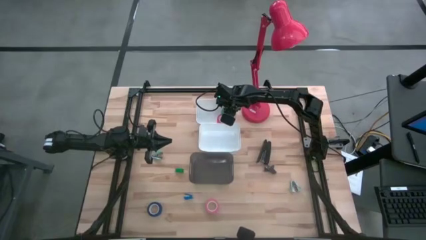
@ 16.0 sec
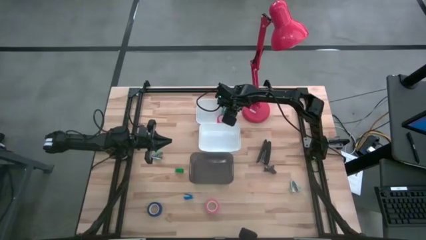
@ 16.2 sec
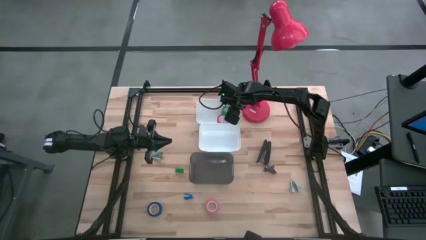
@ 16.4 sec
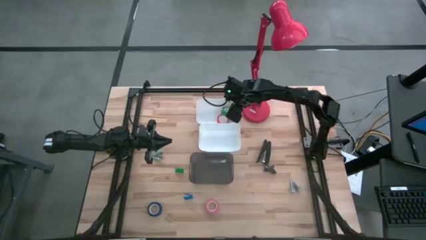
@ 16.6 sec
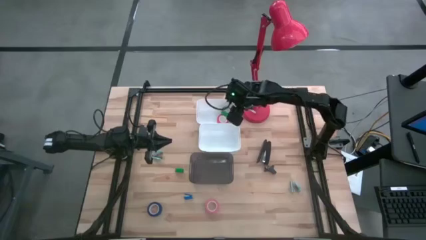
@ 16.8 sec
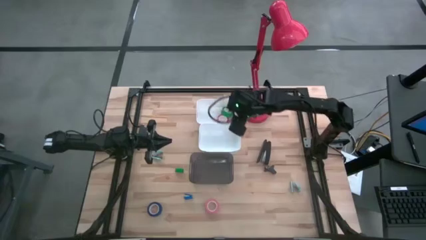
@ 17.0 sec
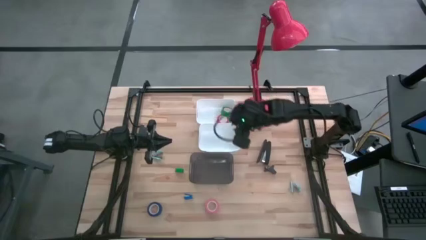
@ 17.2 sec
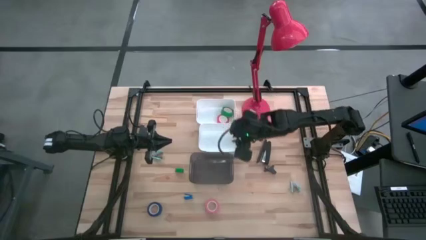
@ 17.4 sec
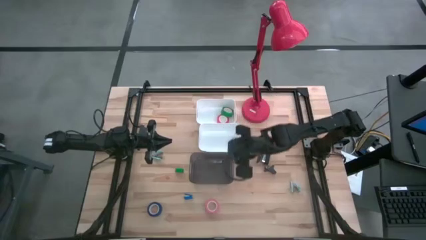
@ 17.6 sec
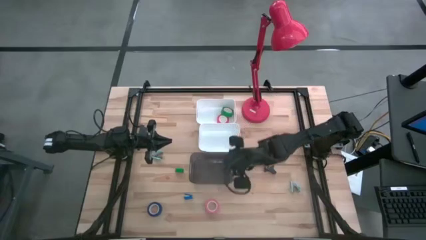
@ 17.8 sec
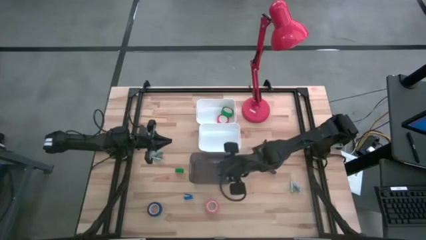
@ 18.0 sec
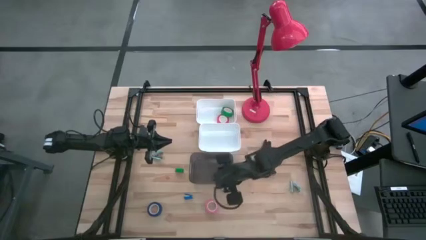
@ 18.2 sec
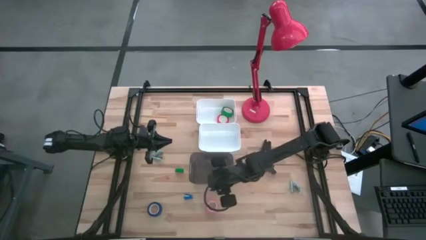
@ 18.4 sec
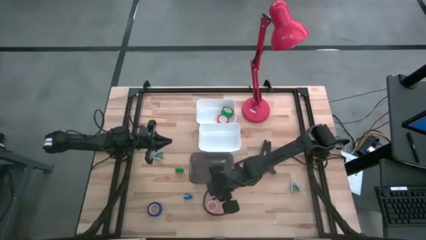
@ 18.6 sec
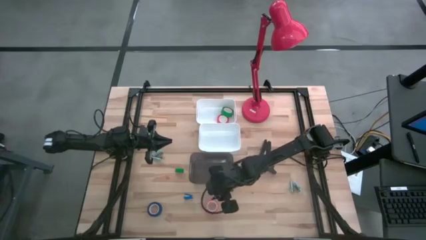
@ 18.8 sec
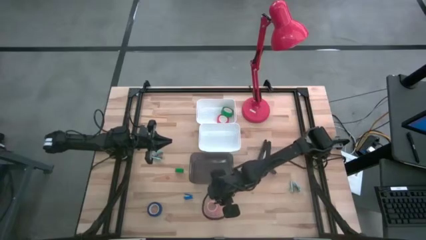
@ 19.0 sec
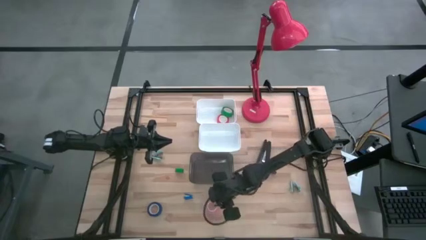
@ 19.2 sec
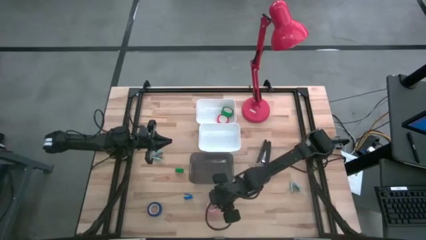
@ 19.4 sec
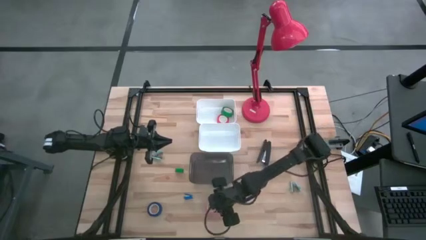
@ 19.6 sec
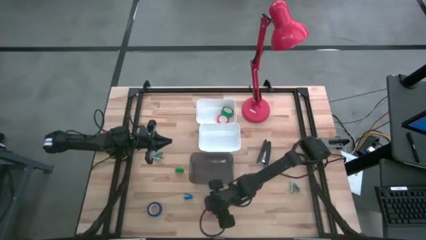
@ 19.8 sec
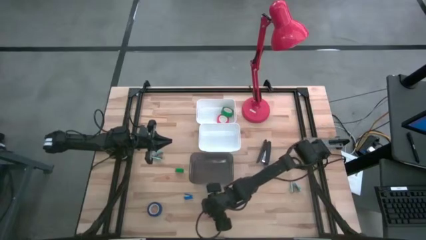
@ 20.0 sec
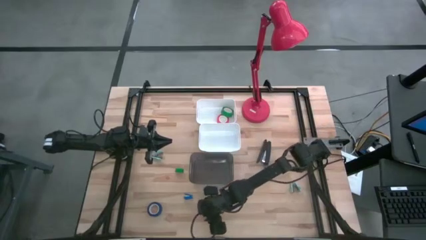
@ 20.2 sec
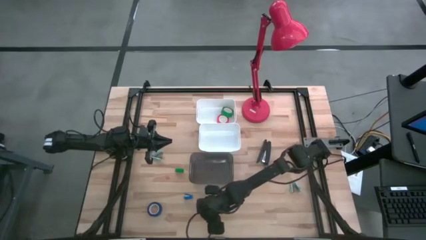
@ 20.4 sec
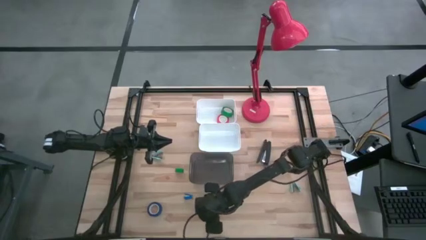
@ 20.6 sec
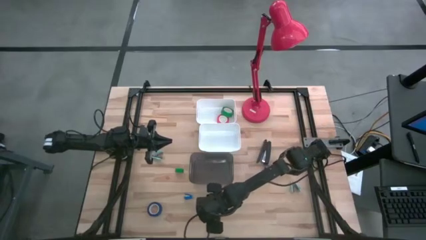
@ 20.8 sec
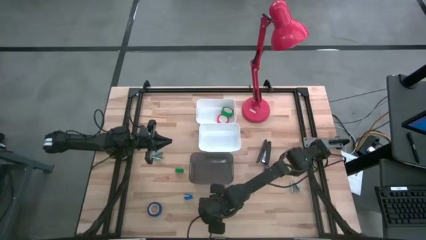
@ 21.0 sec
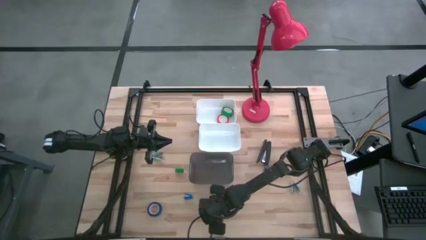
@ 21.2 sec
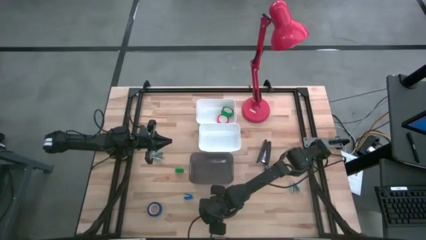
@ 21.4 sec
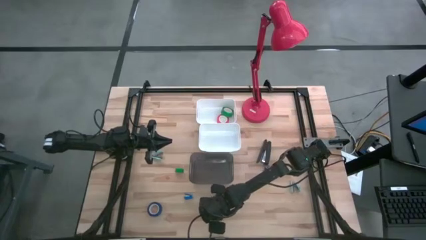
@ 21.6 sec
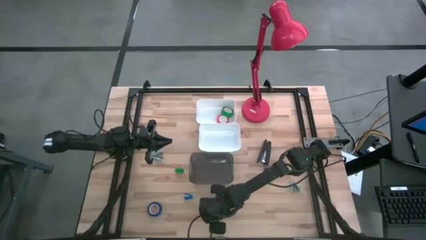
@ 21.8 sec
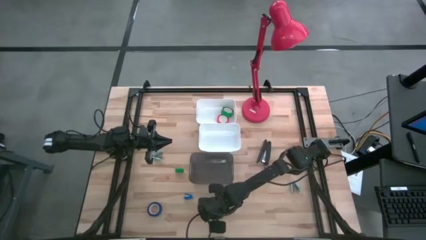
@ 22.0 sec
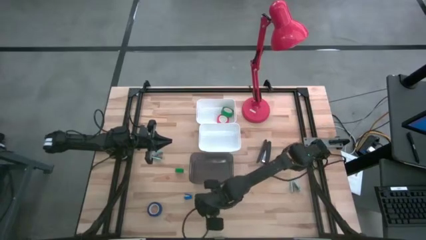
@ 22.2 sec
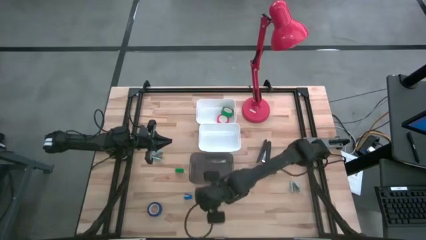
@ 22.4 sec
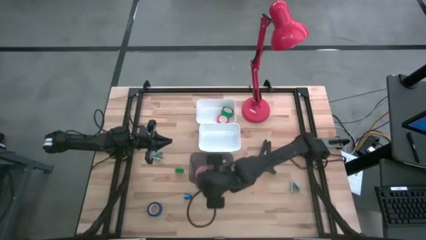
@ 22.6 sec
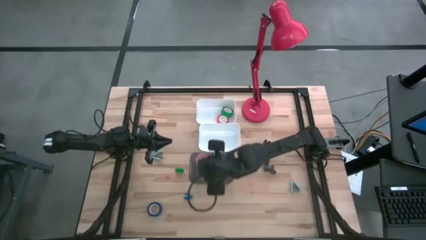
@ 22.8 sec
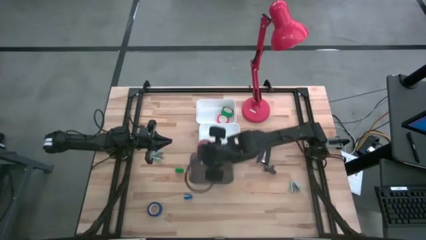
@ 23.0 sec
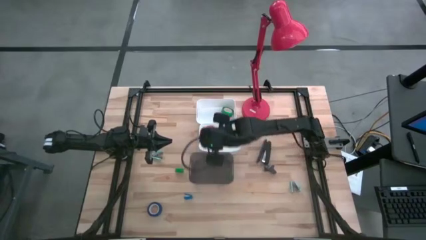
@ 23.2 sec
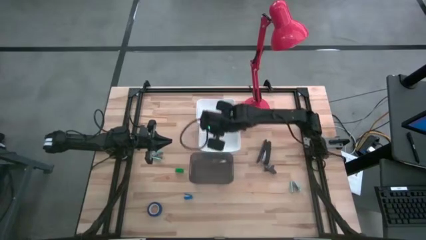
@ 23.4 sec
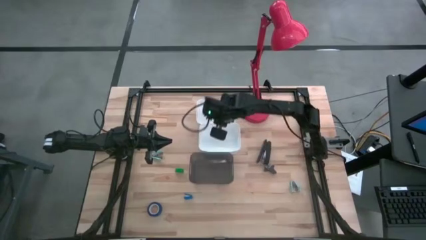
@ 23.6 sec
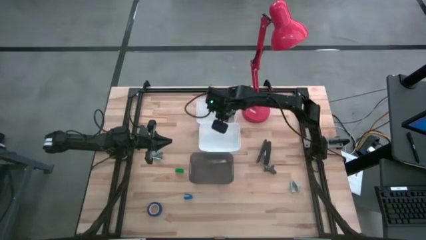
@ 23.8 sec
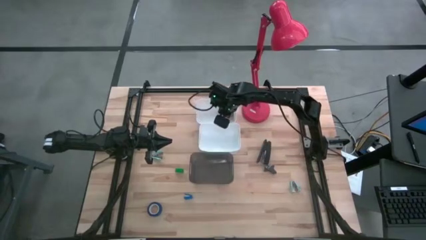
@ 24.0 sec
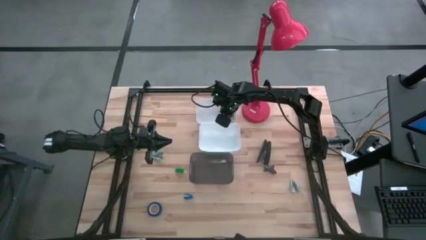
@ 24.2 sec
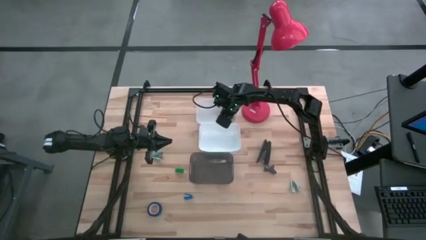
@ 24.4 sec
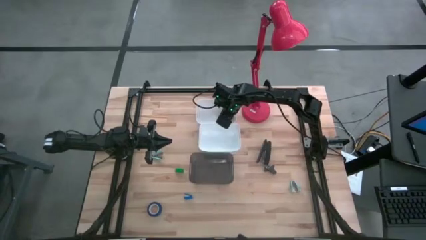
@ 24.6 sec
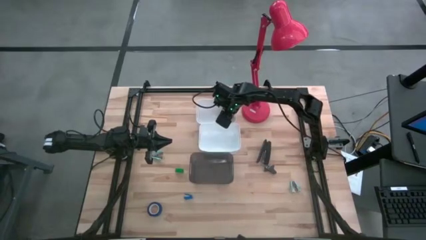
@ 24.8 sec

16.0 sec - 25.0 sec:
Task: Pick and place Stapler, Stapler remover, tape
Put the pink tape into the top white bin

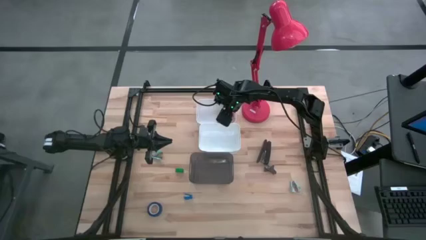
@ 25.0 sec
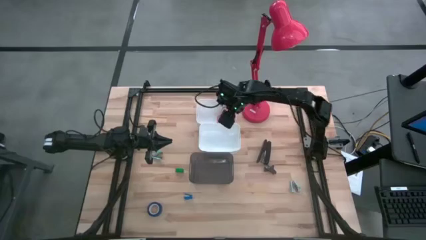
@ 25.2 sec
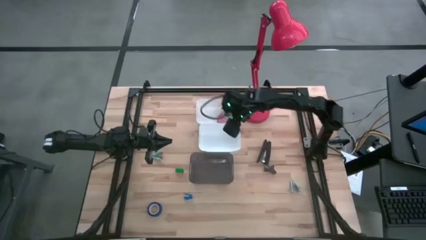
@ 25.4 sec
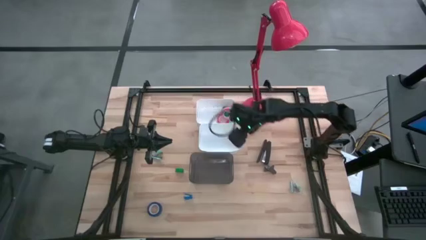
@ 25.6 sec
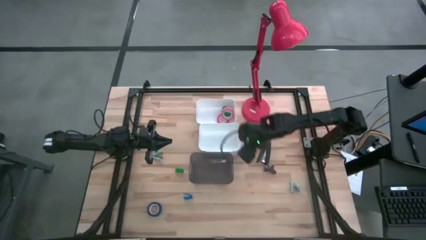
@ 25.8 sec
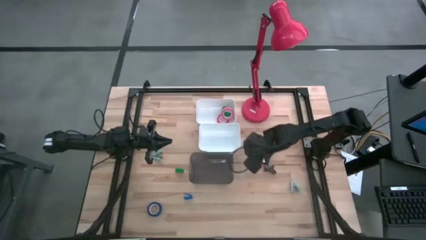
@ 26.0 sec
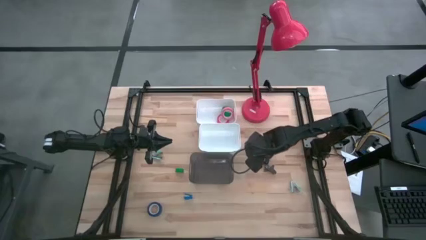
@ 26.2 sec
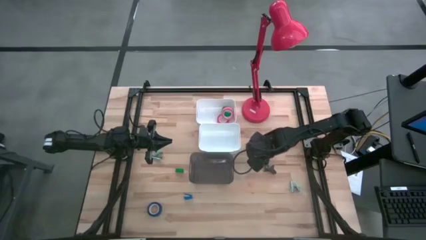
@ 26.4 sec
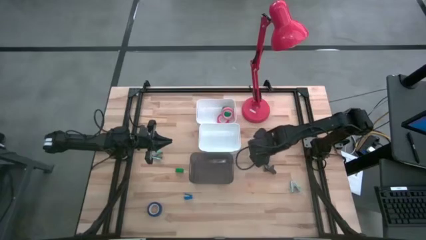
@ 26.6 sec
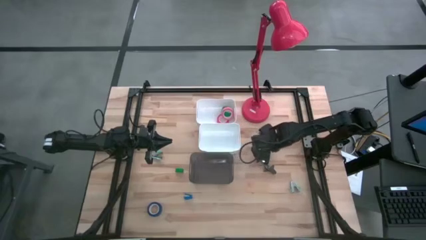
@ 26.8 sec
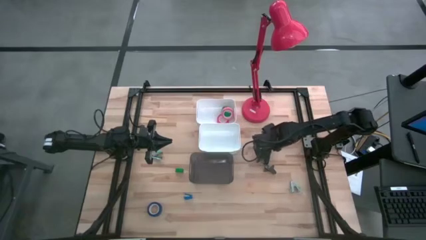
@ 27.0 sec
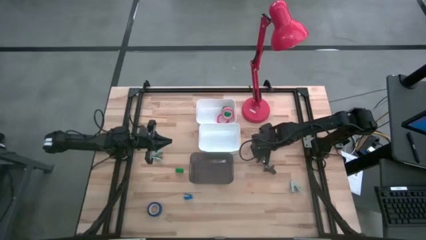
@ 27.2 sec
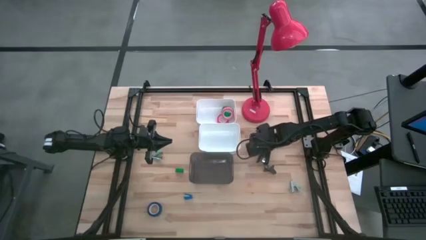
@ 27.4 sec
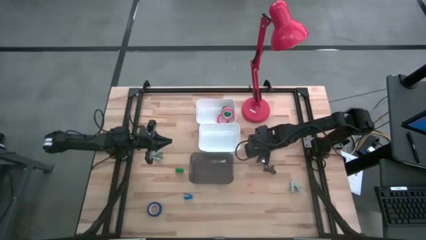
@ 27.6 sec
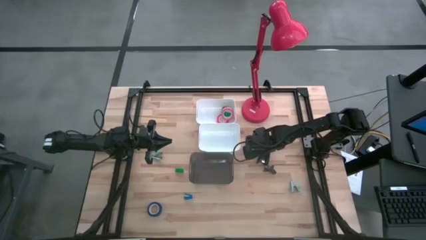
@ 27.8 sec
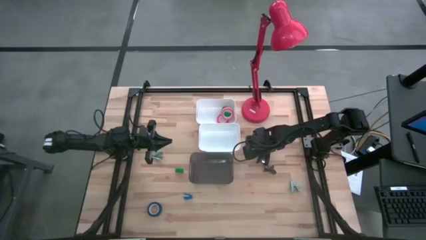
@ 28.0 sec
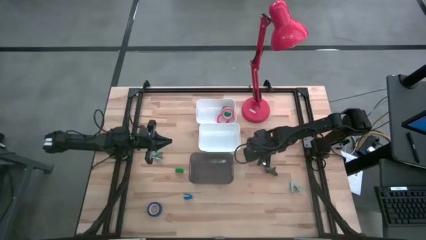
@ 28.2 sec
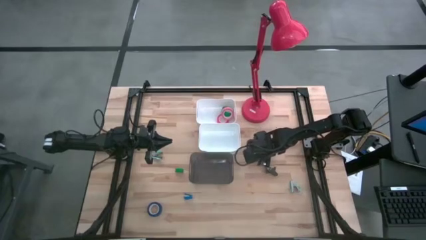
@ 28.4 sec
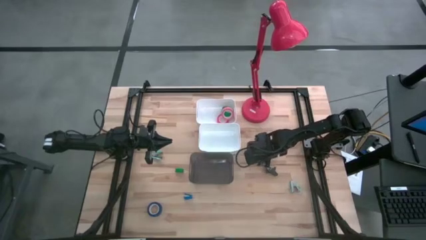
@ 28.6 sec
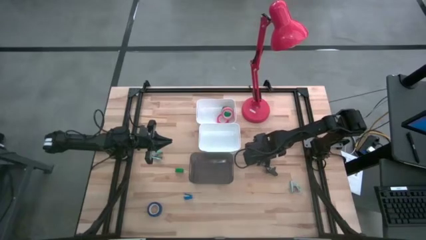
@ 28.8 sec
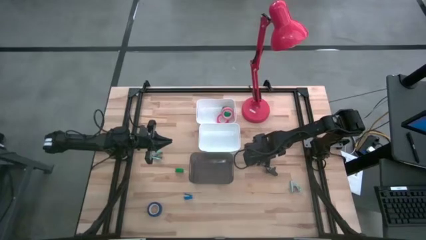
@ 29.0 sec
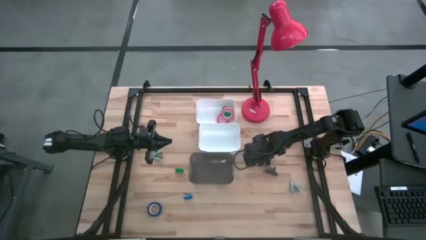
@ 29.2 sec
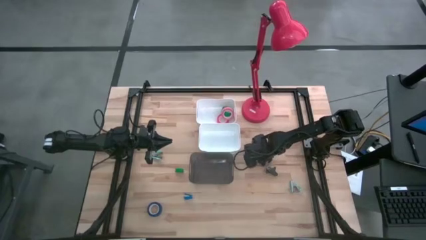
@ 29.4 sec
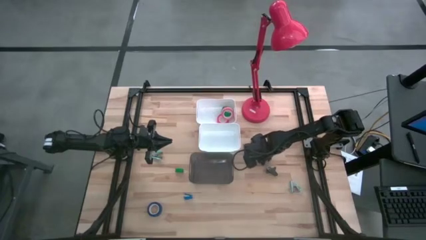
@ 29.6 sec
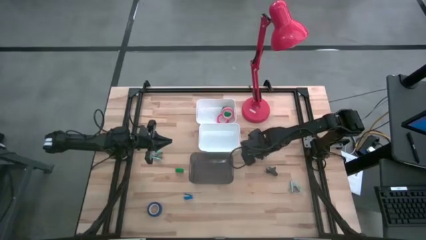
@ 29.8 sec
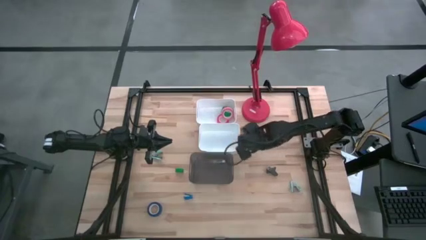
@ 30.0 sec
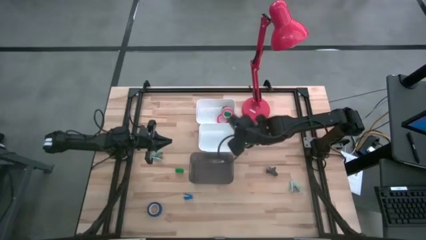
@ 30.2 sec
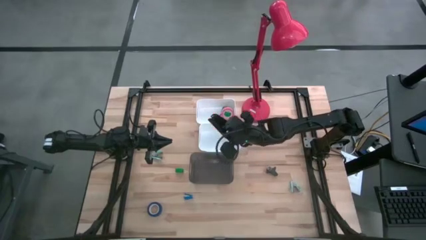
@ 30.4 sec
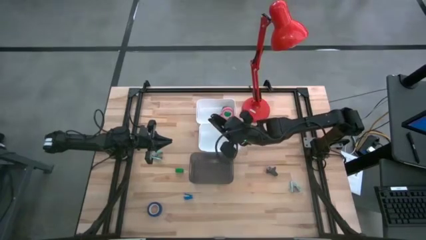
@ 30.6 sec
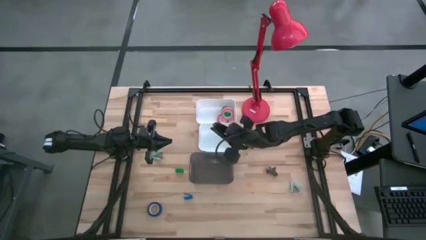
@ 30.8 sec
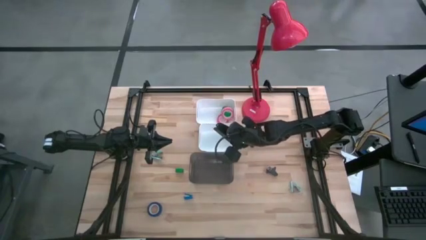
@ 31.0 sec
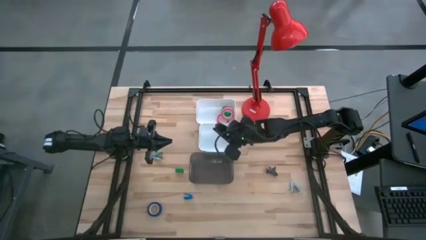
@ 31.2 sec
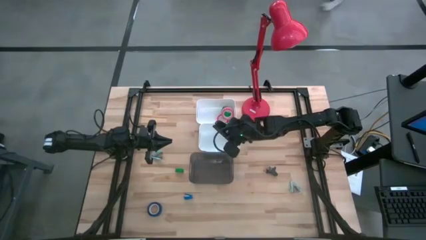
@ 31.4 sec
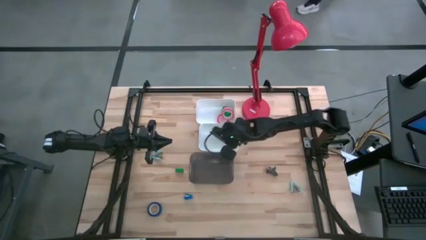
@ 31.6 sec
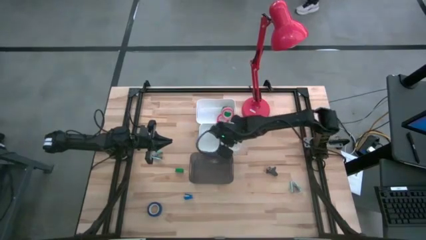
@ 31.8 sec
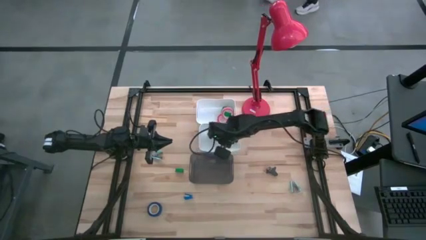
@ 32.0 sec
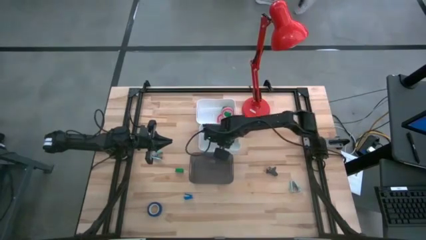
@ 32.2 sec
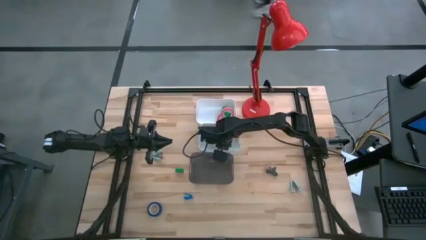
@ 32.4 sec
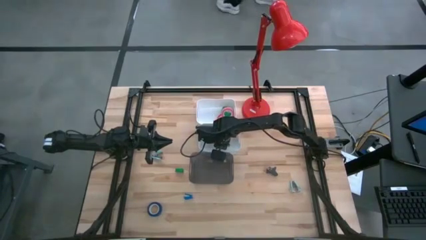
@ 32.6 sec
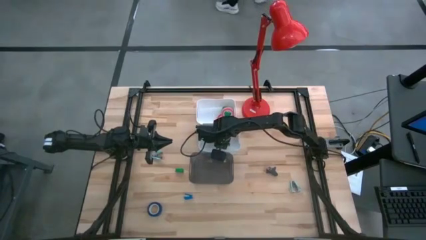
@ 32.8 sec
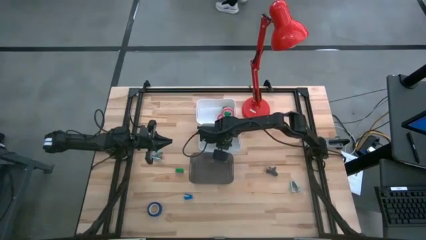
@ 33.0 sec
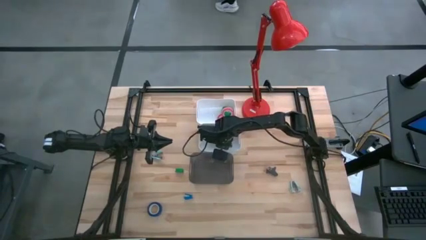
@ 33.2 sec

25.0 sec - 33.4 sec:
Put the black stapler into the bottom white bin
